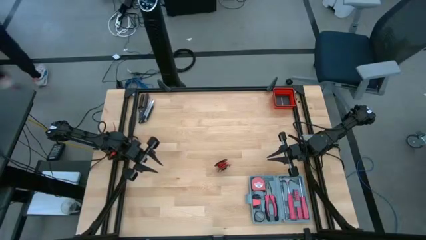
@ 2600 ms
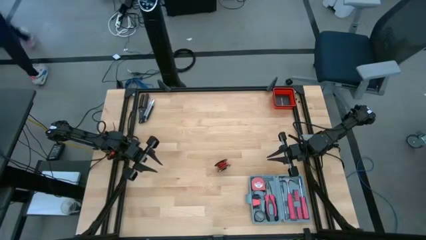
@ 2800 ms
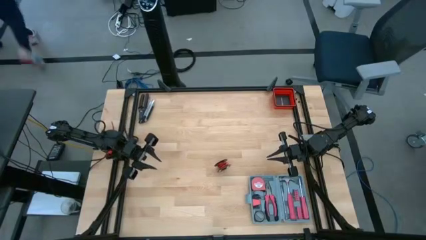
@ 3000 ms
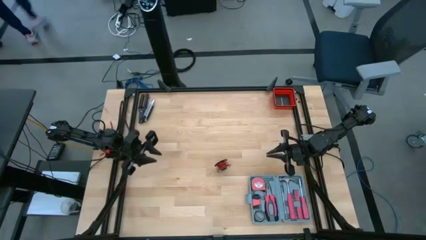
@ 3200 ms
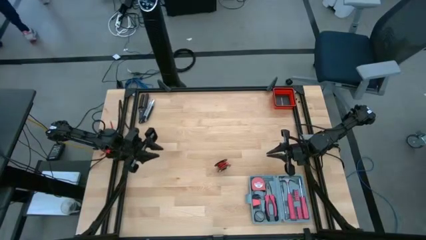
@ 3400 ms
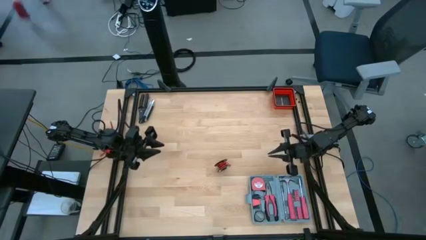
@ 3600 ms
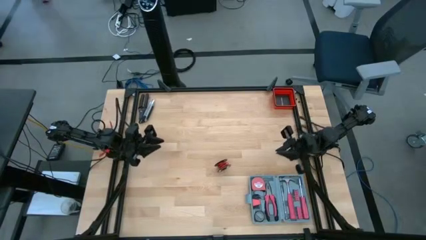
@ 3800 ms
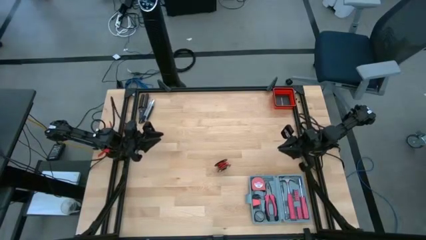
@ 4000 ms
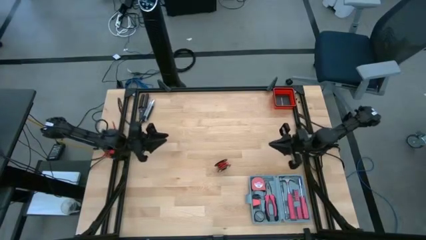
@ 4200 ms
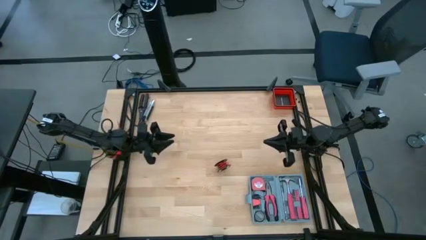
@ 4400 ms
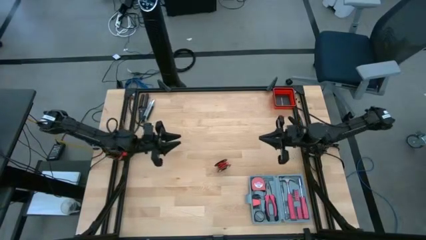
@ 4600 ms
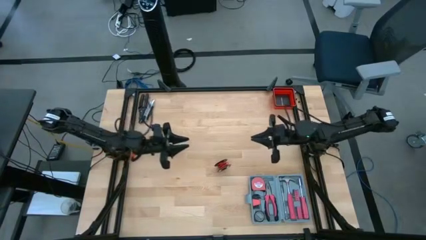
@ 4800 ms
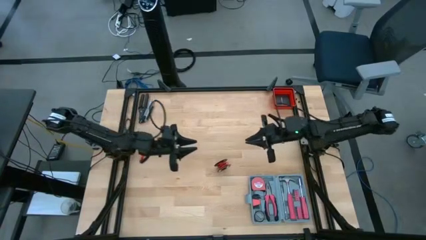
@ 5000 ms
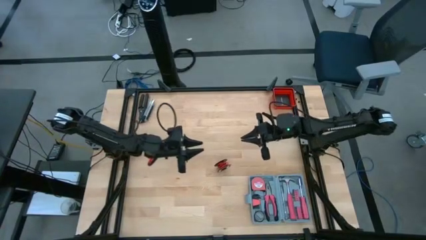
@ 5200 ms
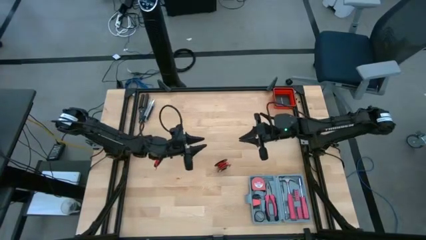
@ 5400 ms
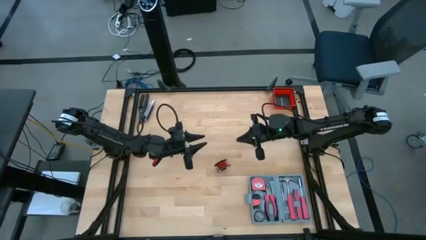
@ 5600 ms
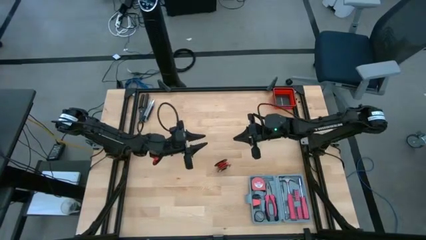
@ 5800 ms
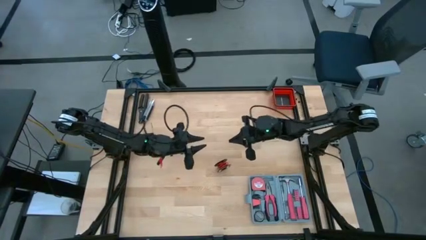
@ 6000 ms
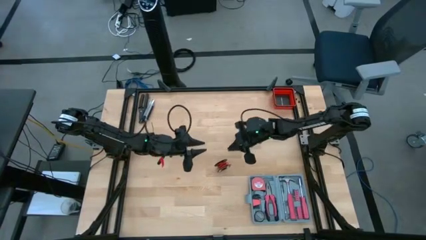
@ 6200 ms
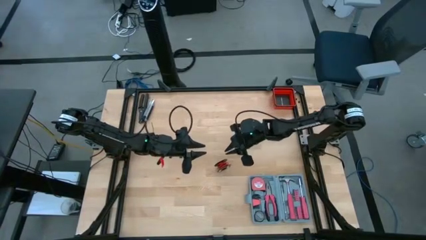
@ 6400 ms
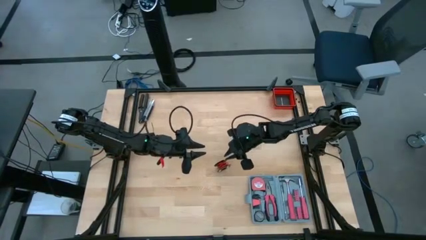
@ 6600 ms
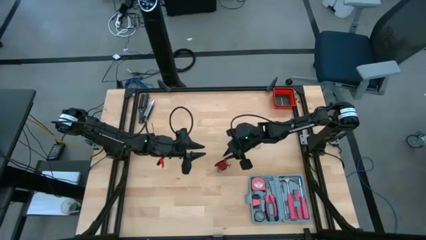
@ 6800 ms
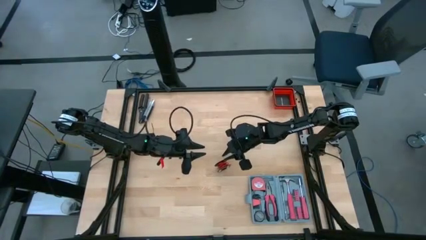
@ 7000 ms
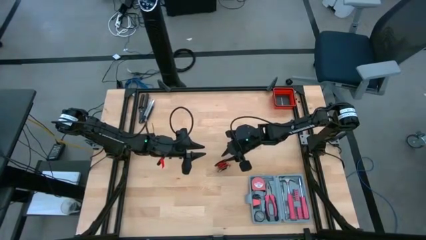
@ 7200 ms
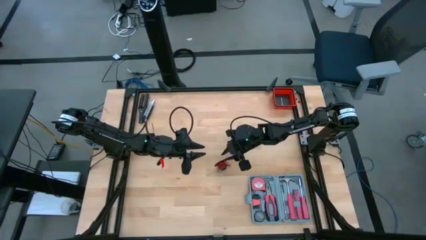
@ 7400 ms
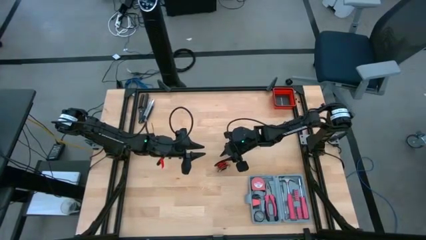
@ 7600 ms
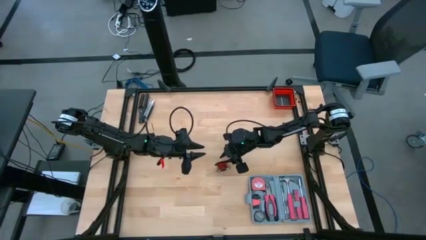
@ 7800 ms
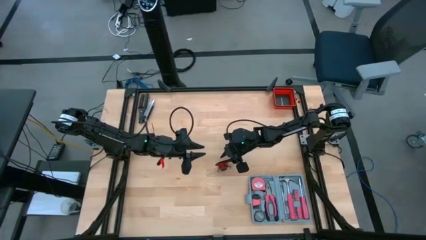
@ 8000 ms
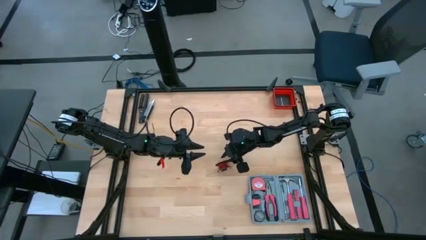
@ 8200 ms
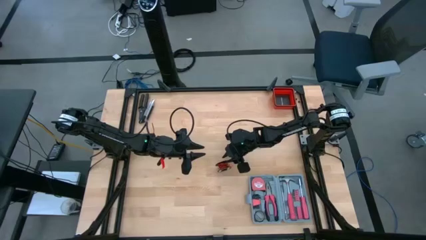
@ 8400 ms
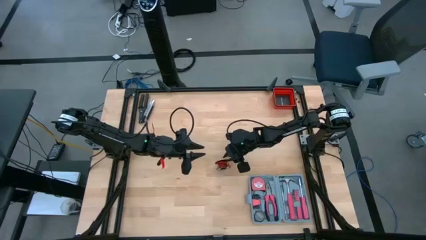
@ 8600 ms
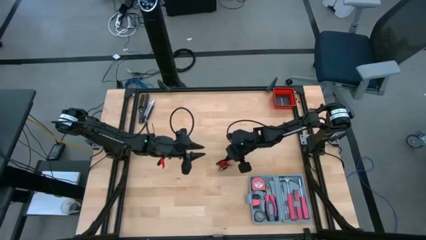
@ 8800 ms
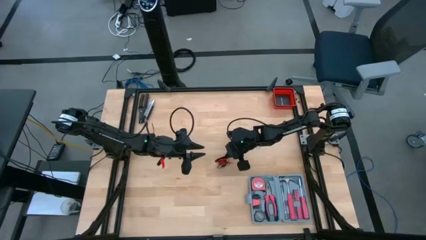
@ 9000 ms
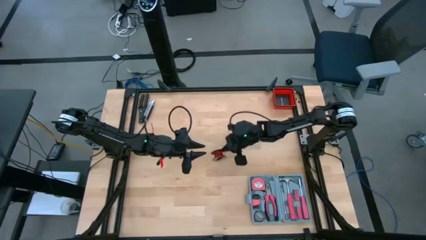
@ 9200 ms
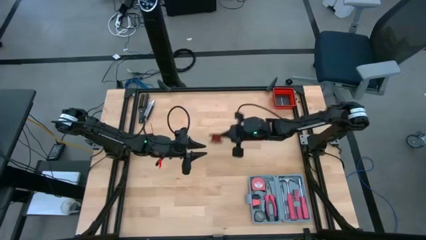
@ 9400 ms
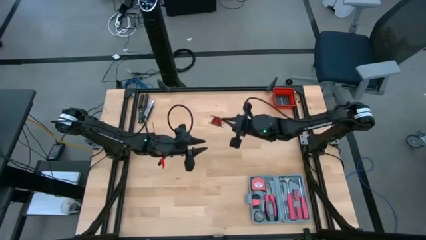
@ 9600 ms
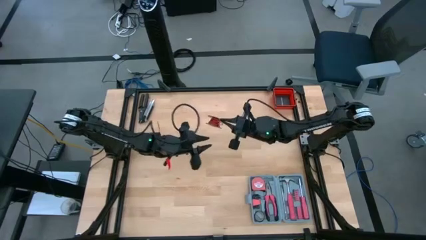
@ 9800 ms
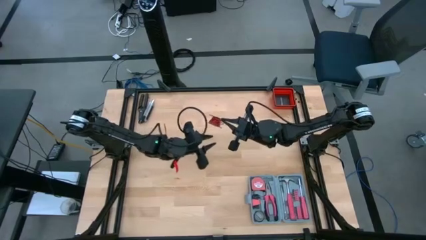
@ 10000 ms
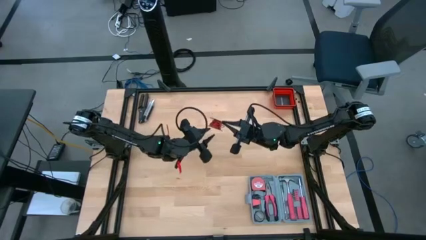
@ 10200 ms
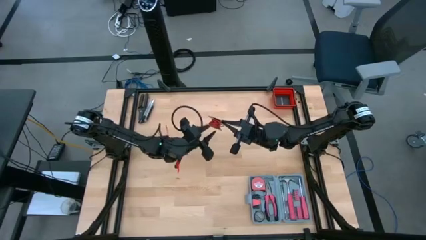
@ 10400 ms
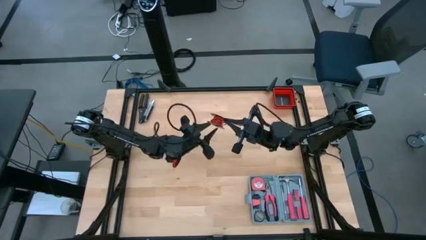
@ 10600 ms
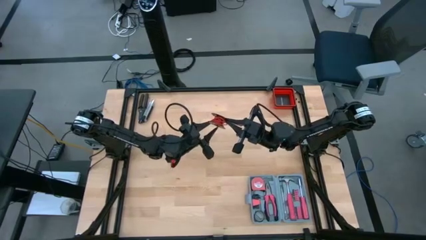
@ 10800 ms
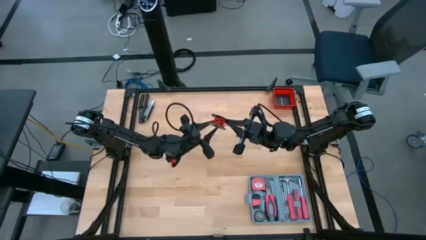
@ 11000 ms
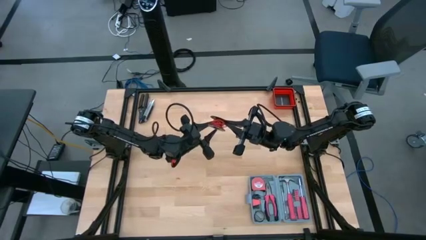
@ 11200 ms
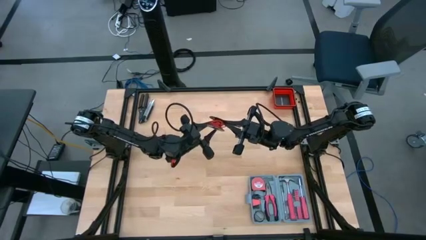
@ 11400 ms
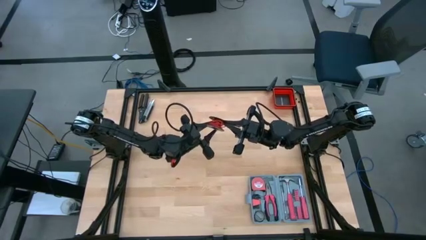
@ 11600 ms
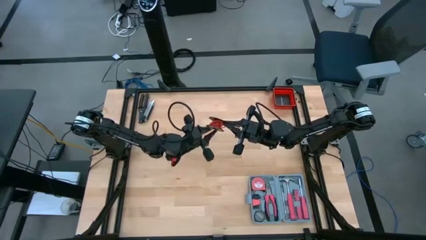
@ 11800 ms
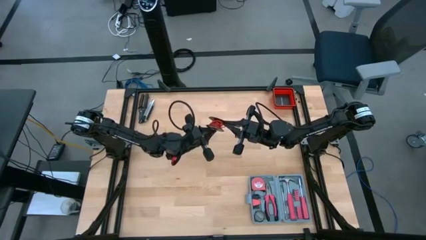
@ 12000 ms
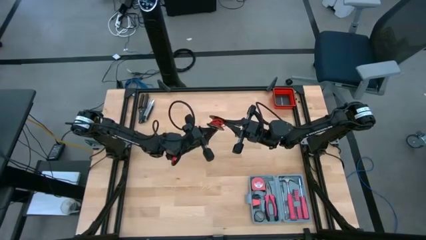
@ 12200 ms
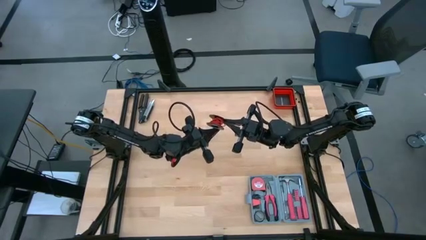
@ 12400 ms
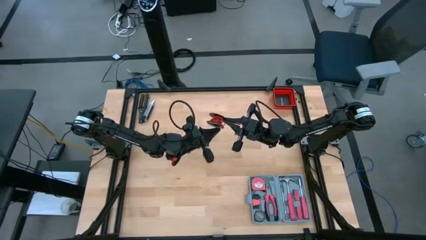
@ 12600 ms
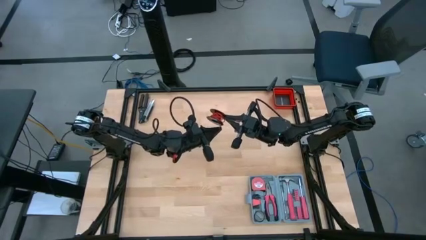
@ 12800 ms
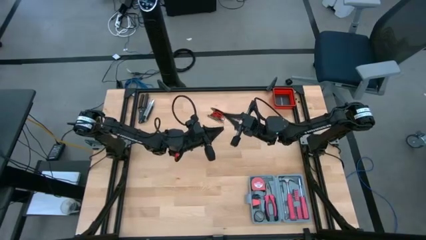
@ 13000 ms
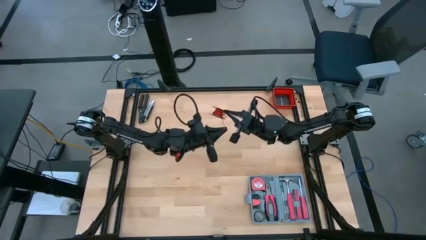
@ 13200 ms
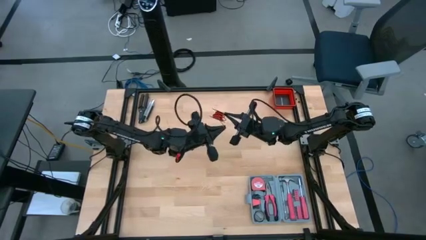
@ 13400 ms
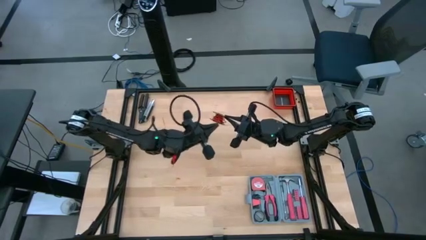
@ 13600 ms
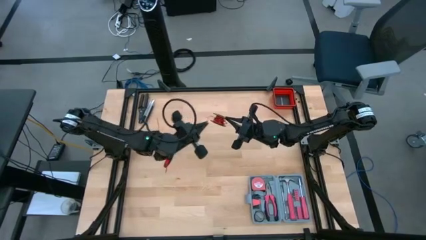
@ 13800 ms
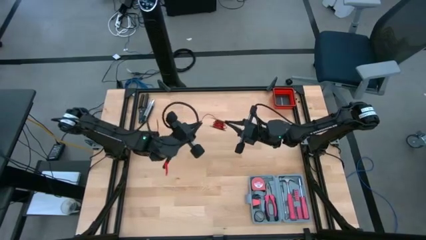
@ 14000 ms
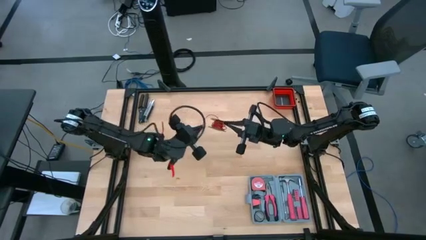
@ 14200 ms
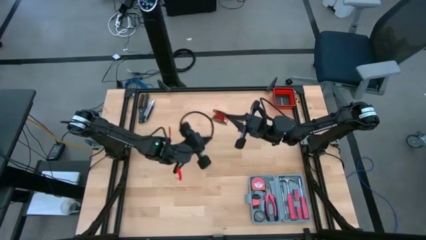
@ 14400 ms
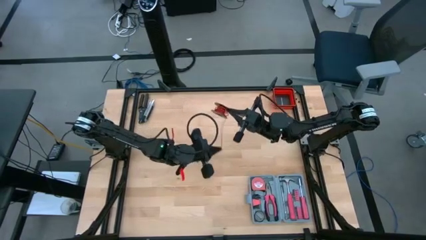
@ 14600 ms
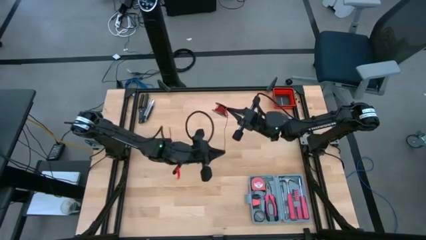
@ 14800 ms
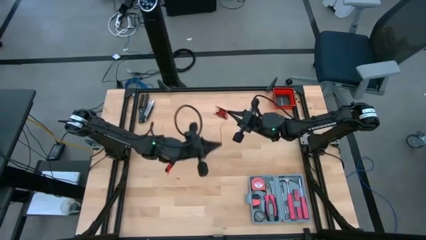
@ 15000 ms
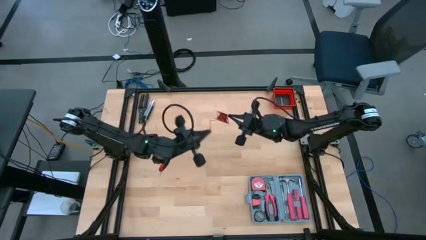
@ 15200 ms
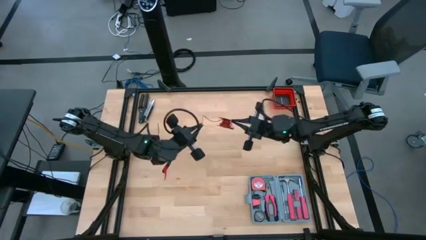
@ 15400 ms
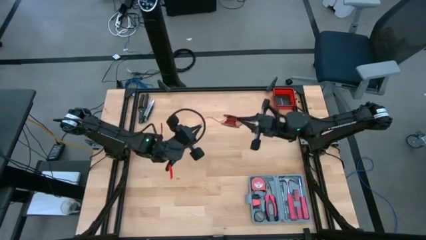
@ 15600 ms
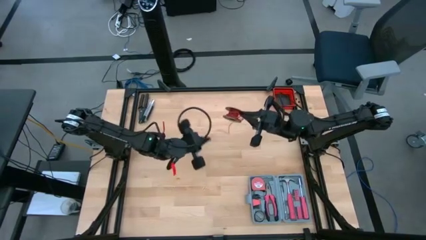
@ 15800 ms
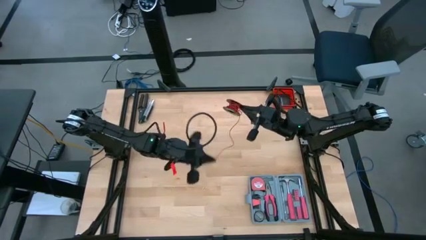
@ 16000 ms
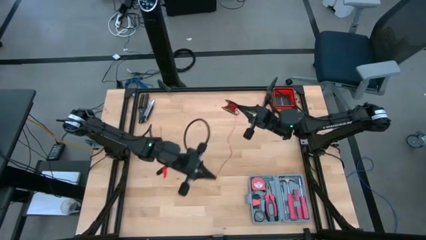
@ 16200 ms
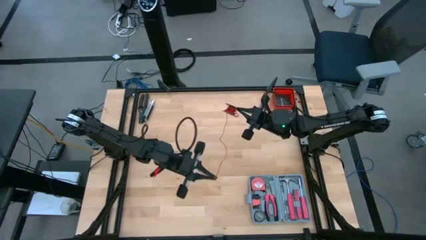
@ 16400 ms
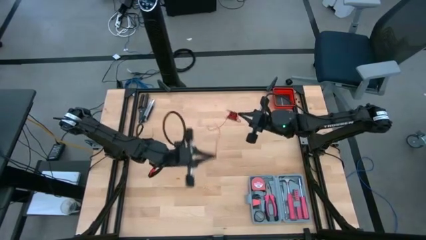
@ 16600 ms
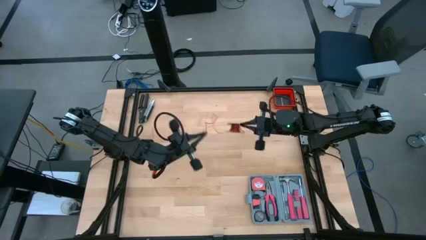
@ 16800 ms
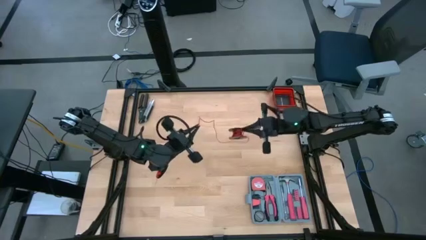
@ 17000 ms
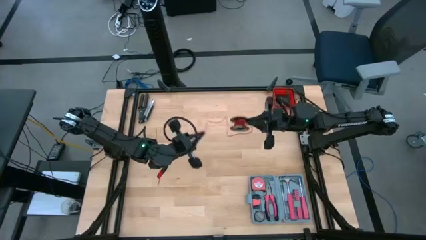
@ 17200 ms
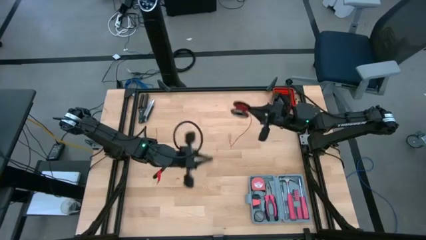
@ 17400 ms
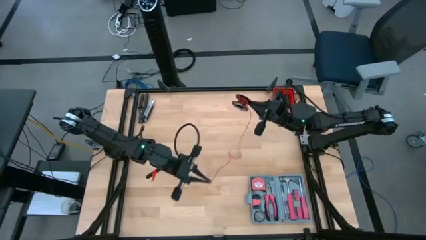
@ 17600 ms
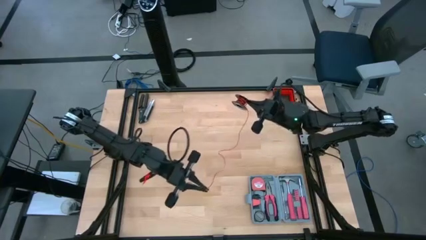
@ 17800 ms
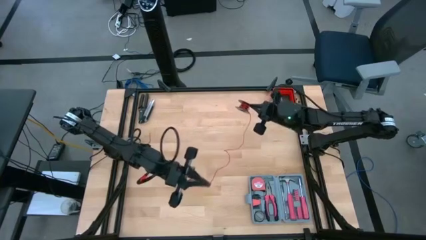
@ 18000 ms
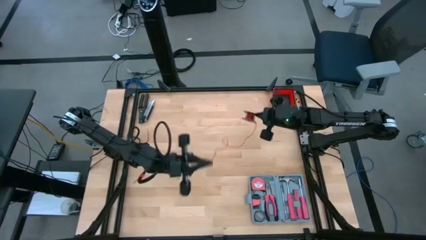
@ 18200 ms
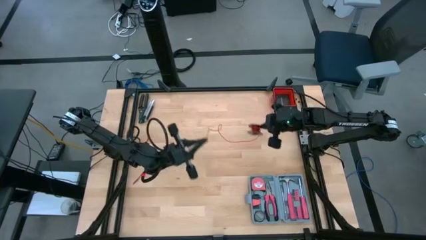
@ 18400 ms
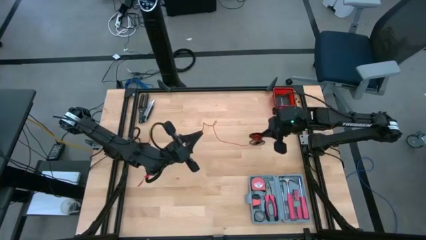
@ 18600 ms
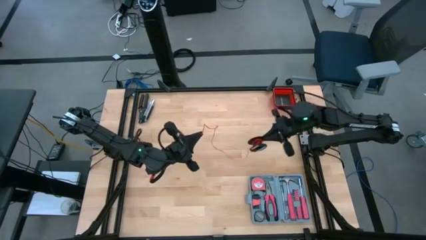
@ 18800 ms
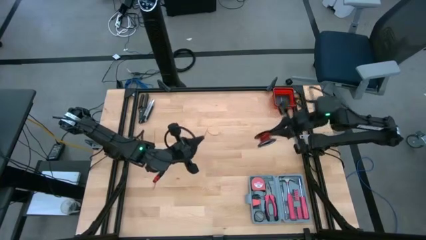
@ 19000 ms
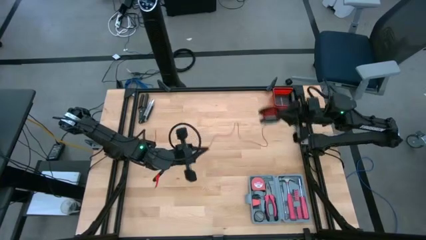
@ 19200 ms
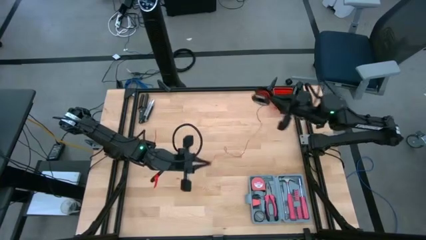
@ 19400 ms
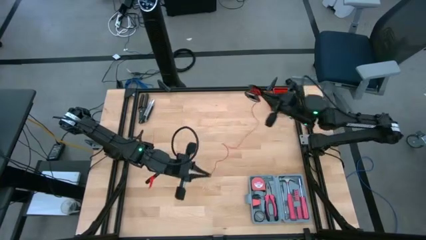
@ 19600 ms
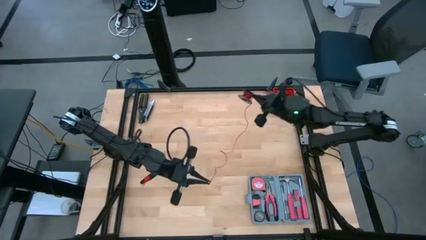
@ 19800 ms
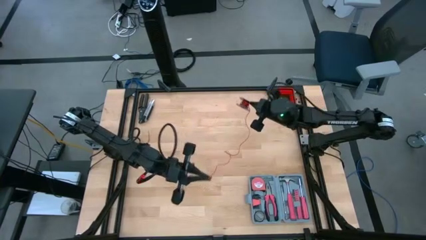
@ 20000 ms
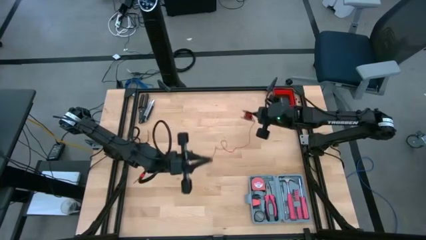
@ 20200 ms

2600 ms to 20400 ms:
Task: Coil cords
Uncoil the wire
